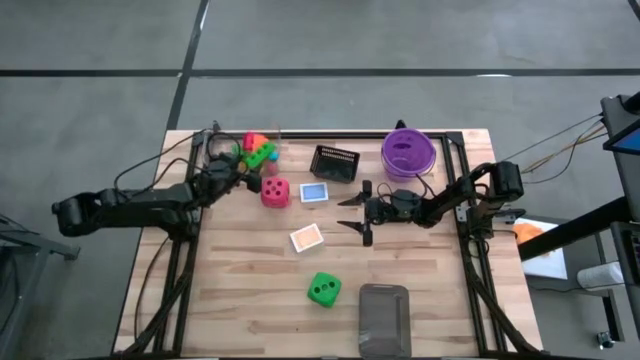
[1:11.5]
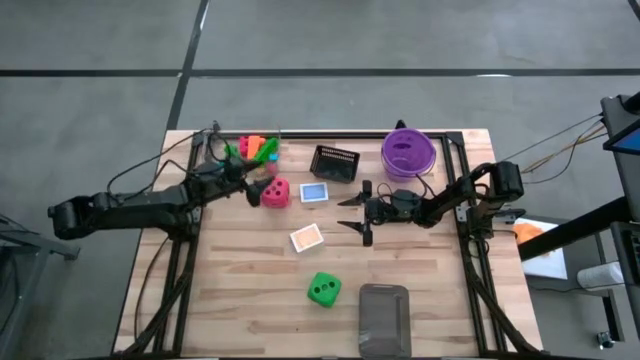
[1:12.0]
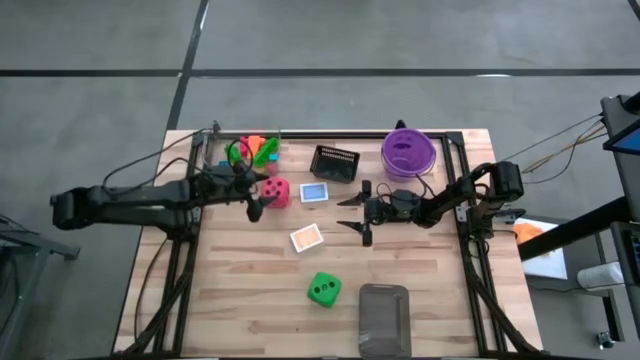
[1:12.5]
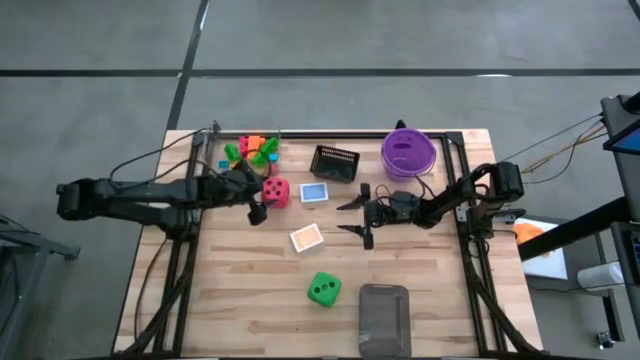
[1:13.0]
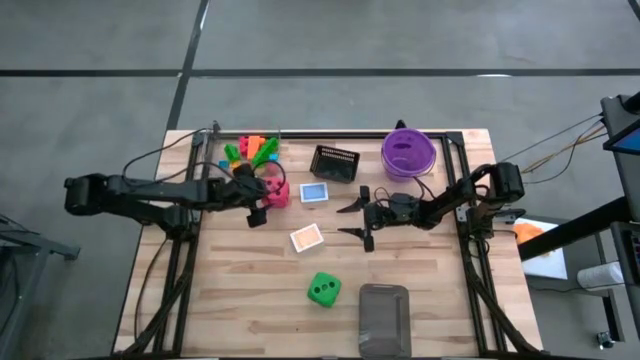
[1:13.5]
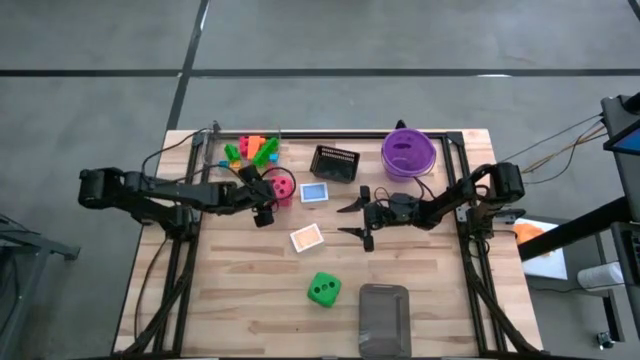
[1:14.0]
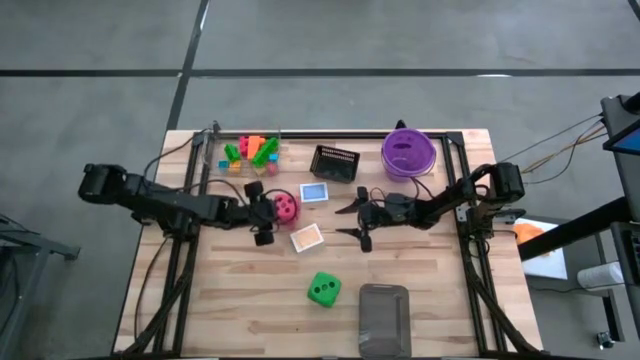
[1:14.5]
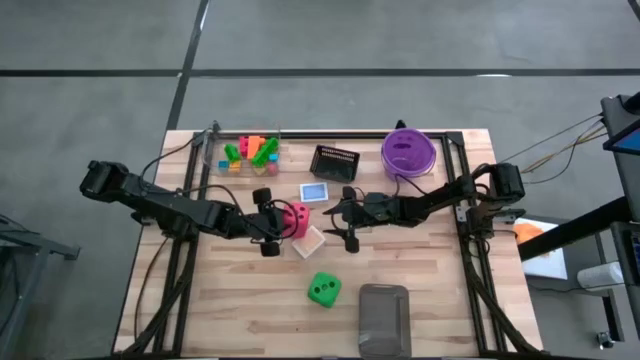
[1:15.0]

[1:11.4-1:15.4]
Task: Pick & Place Toys
Put the red dice into the black bin

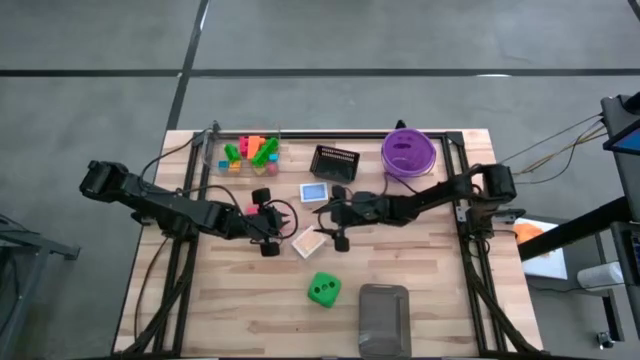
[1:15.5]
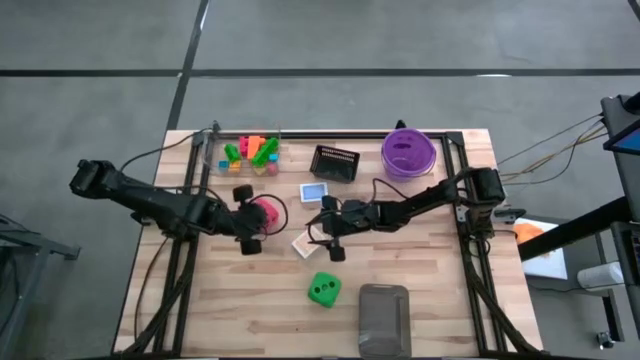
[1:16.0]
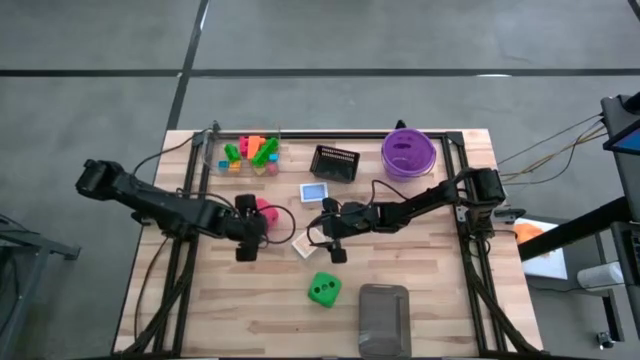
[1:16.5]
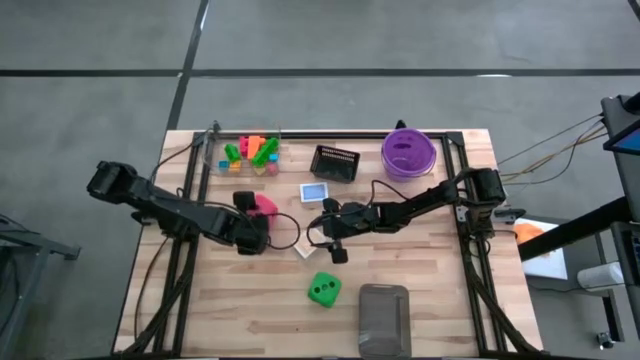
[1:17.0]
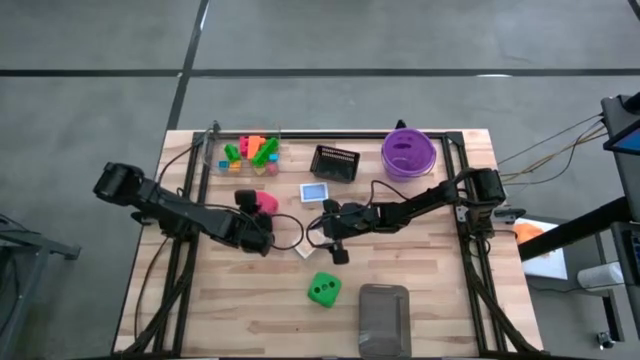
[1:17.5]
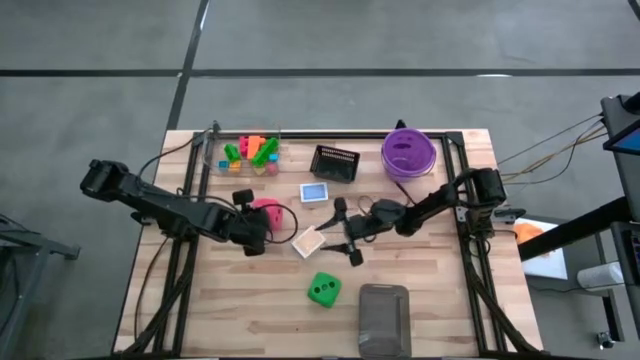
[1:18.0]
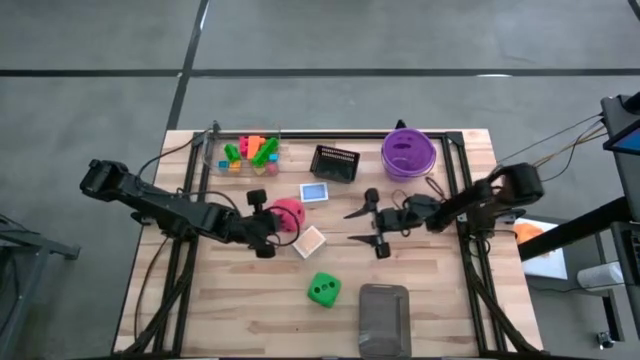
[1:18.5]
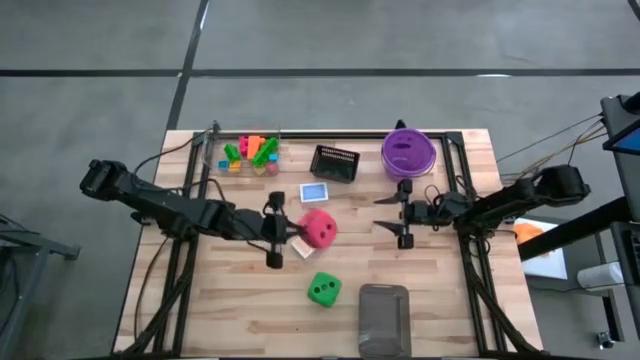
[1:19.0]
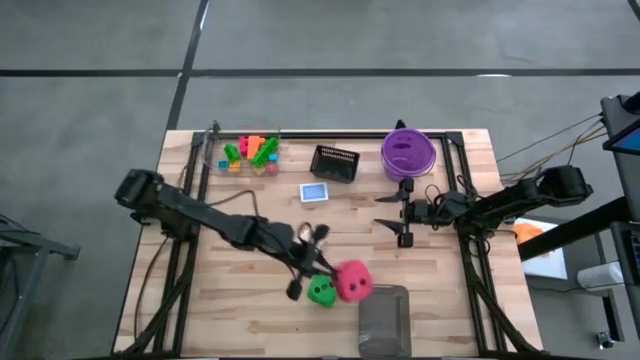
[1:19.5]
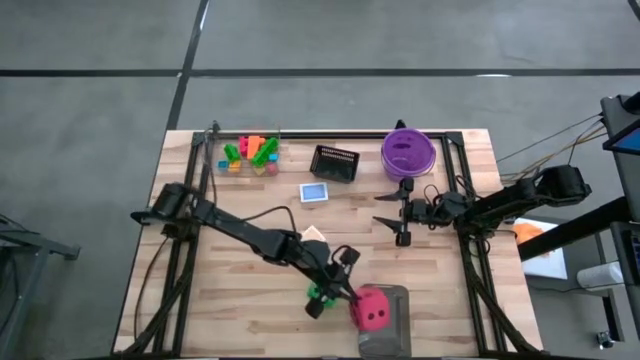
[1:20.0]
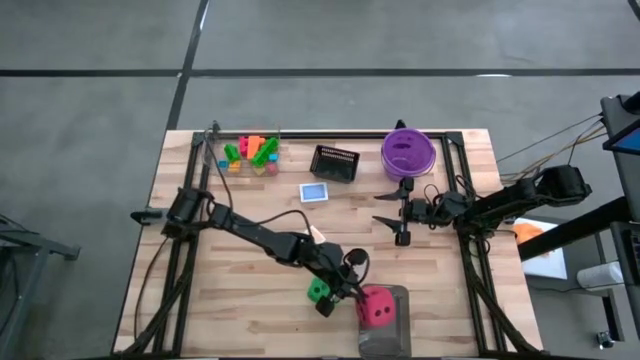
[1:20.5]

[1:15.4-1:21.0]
Put the red dice into the black bin

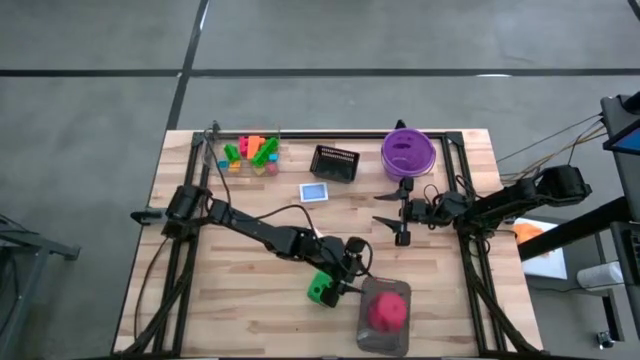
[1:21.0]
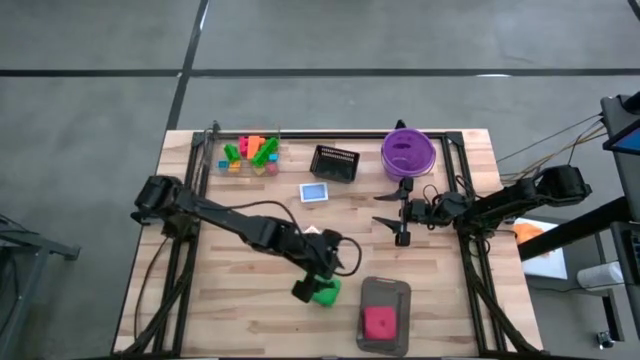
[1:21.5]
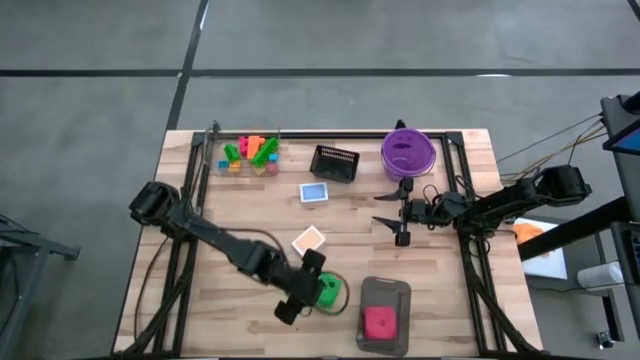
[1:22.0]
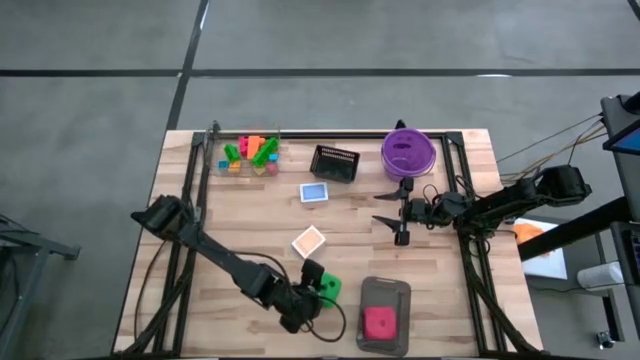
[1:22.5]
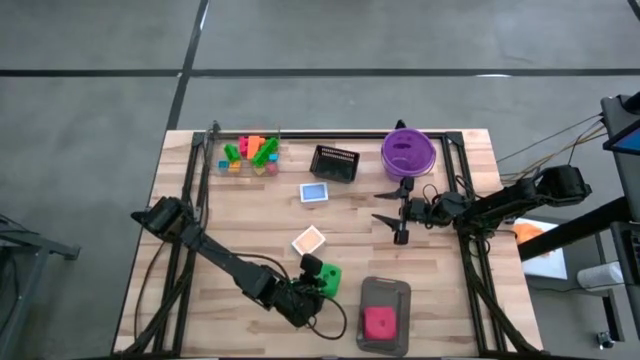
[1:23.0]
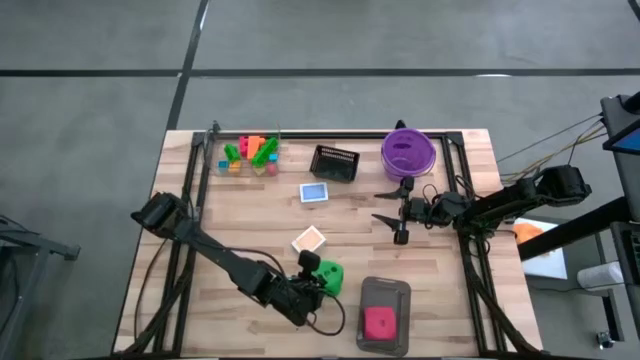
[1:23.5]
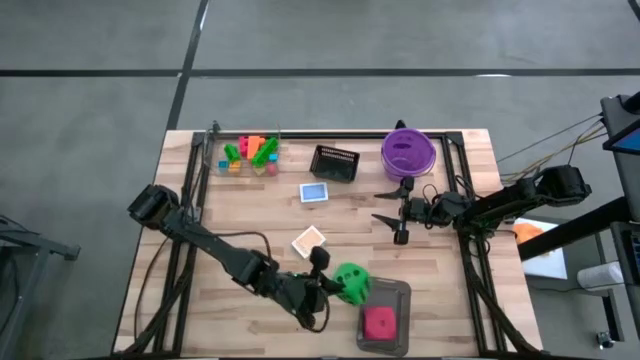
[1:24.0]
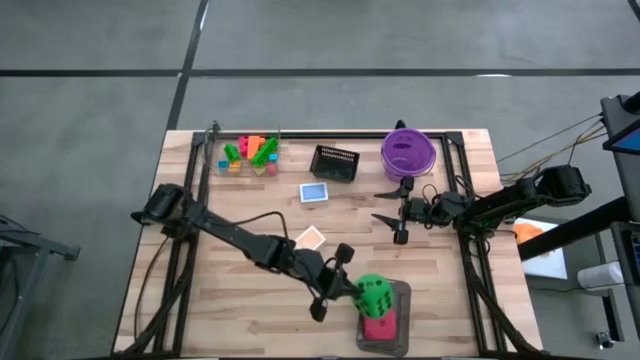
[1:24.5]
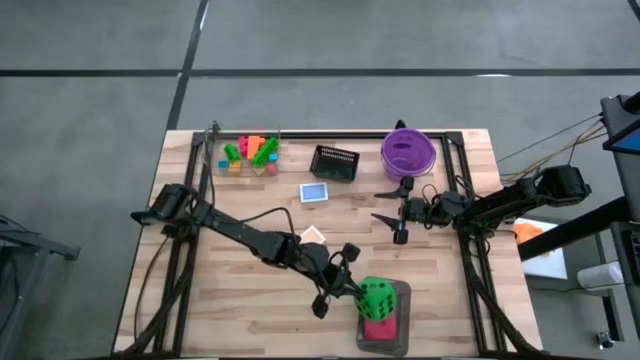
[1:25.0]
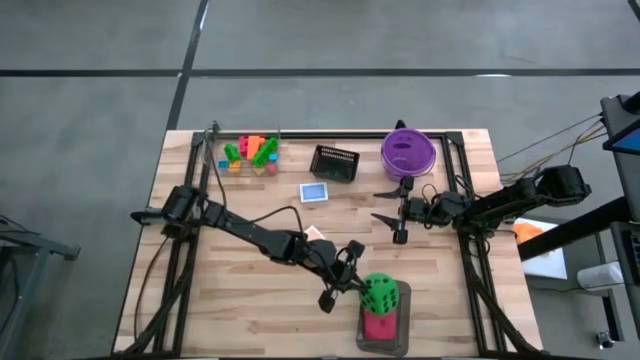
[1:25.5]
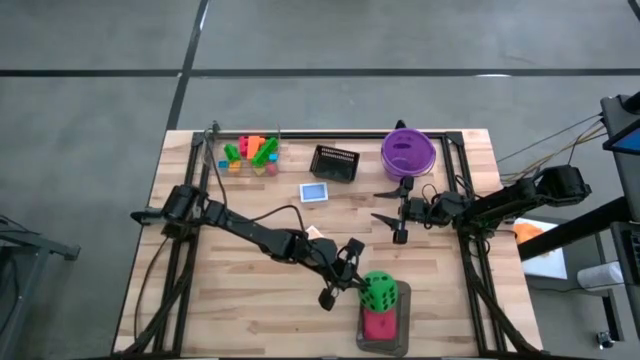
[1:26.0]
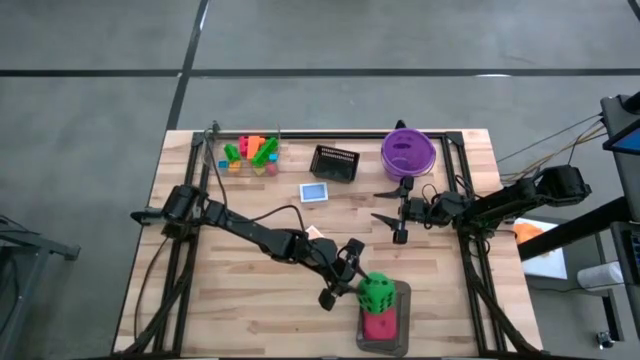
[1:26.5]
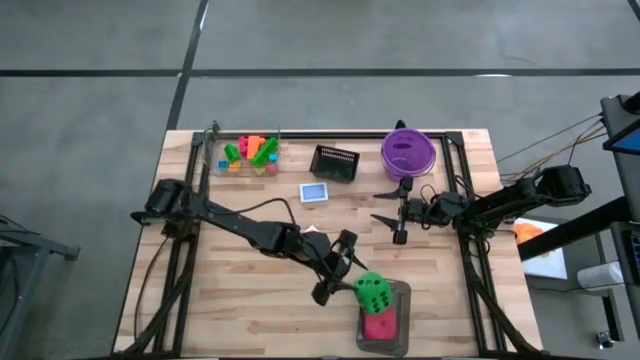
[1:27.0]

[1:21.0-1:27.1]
Put the green dice into the black bin

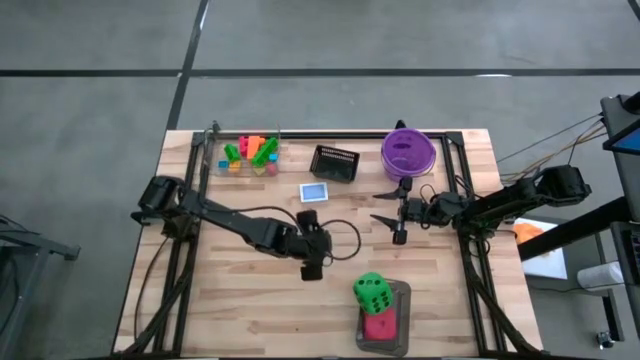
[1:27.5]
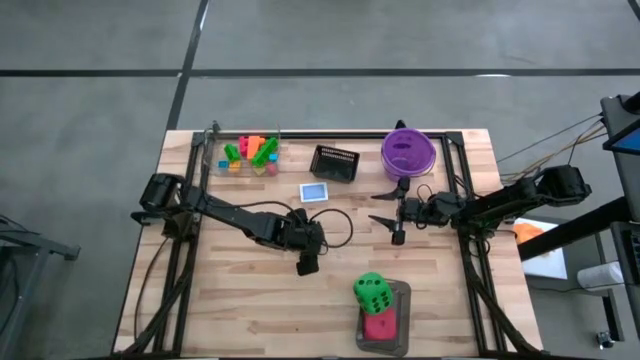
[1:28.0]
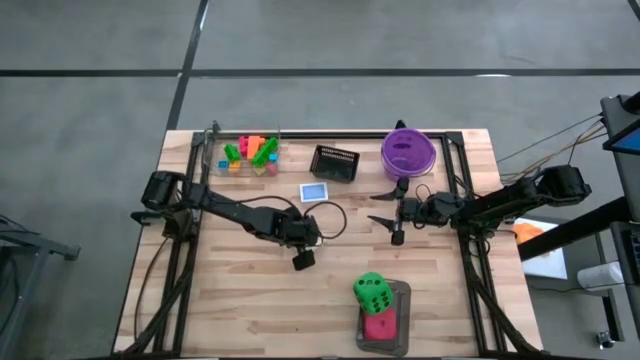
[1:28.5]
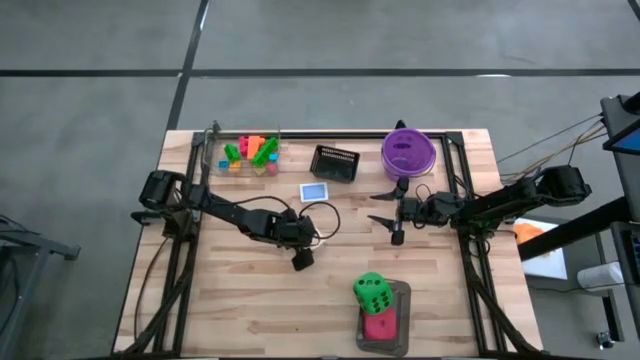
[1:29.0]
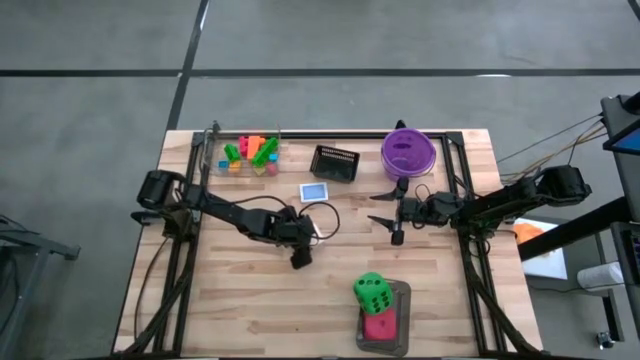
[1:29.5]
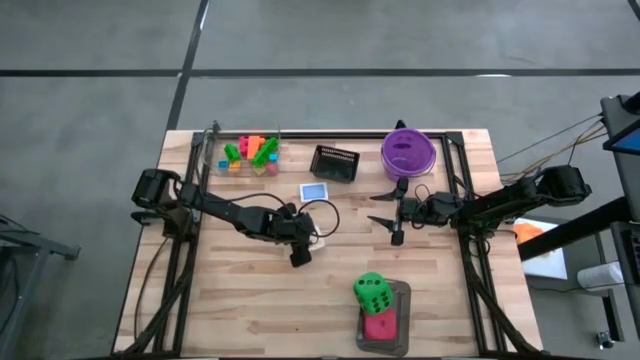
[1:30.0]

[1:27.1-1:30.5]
Put the yellow deck of cards into the black basket

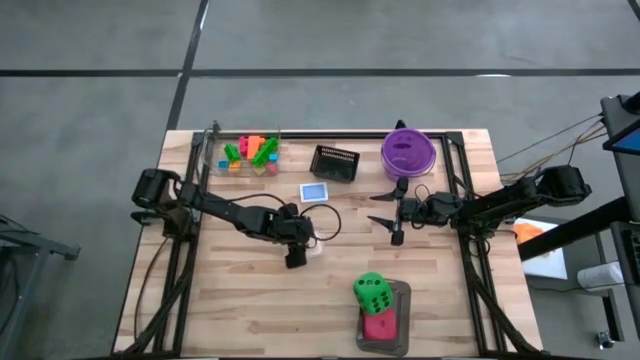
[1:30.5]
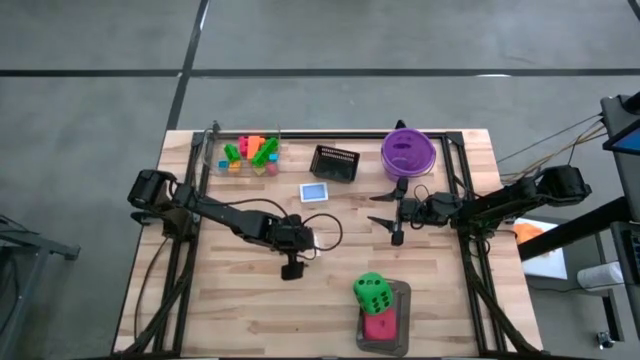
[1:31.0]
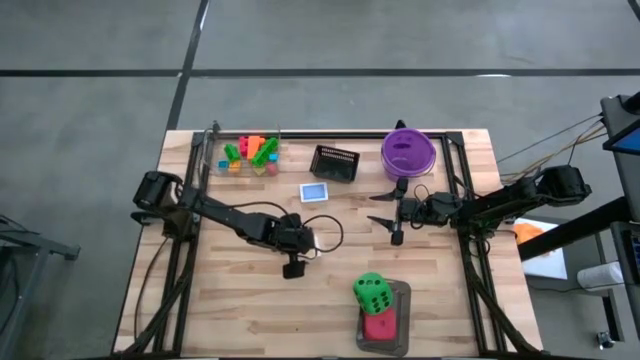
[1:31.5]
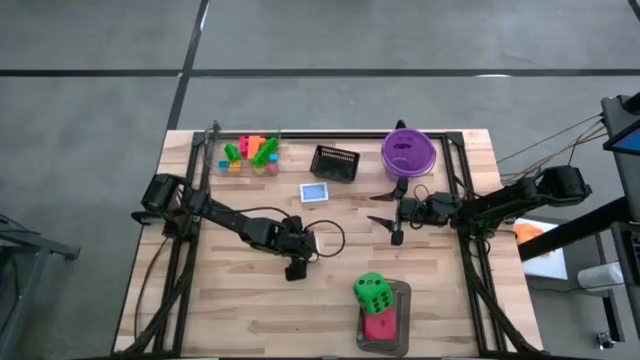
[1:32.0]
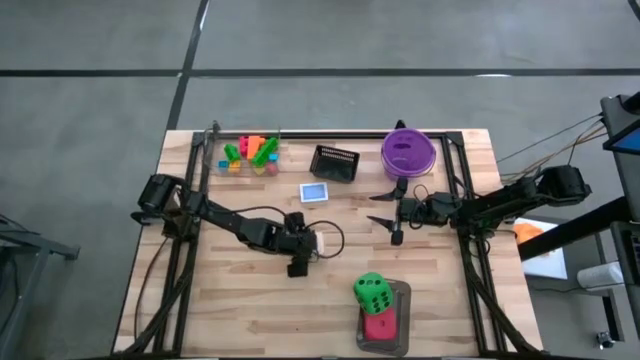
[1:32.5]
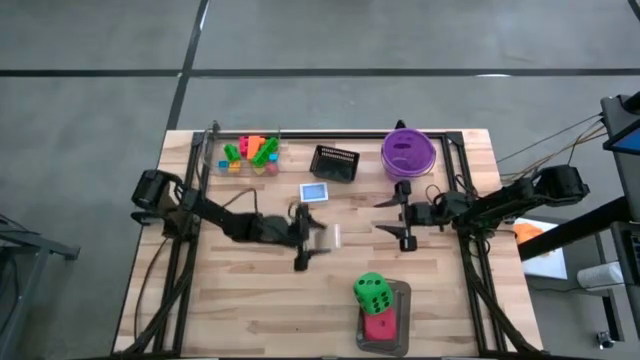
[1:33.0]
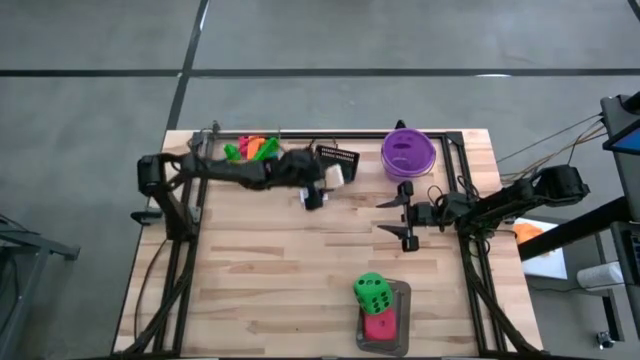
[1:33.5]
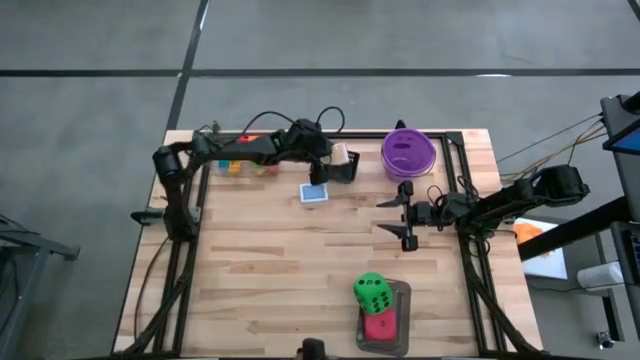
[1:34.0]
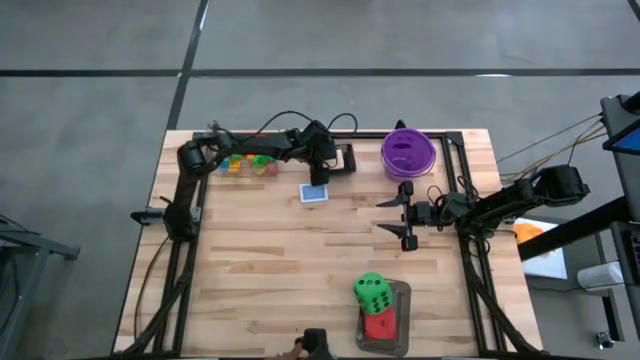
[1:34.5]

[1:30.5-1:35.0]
Put the yellow deck of cards into the black basket
